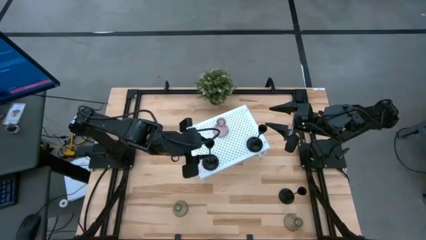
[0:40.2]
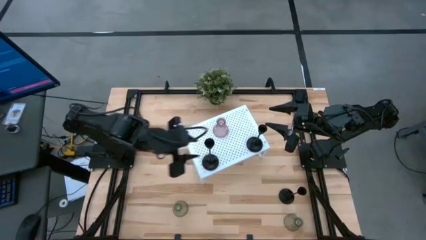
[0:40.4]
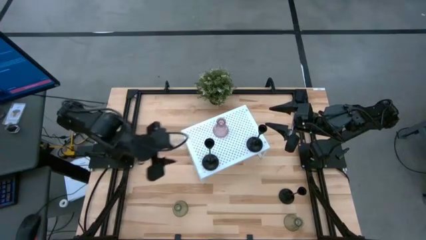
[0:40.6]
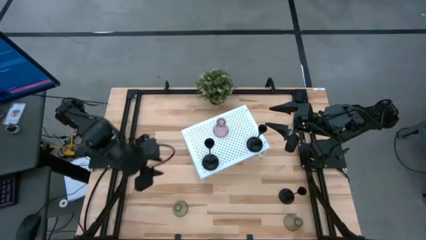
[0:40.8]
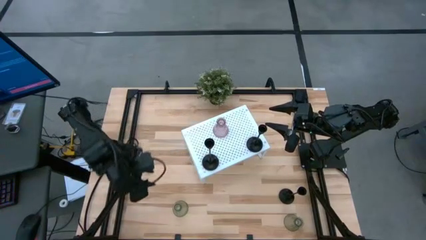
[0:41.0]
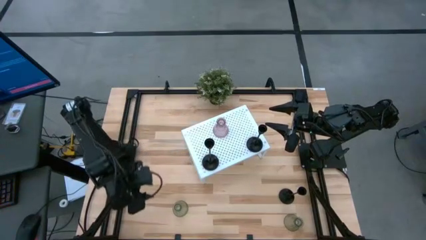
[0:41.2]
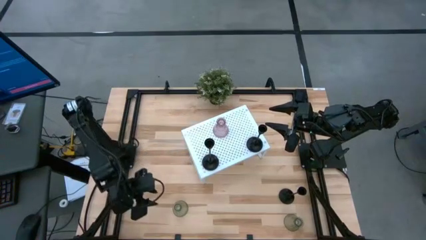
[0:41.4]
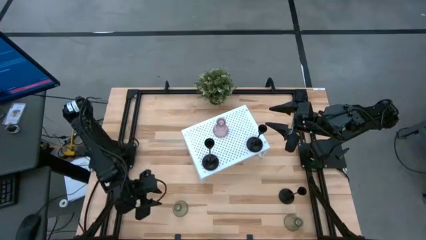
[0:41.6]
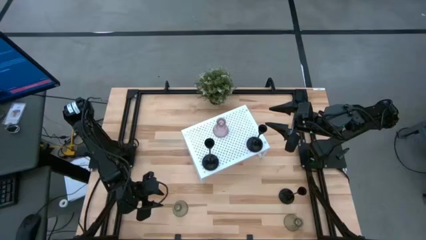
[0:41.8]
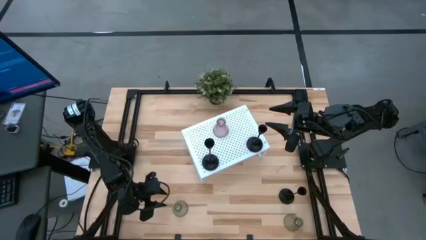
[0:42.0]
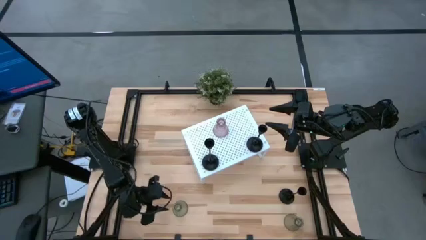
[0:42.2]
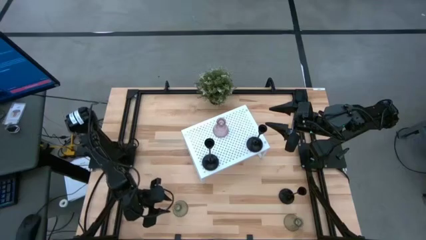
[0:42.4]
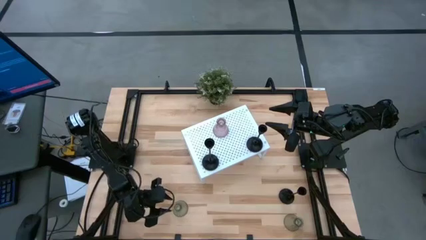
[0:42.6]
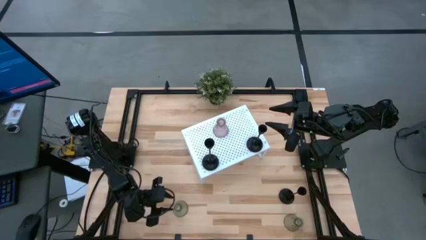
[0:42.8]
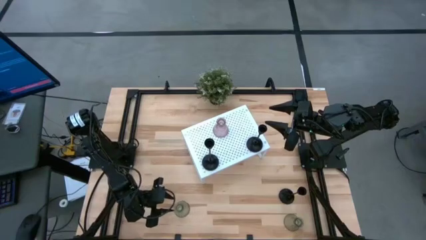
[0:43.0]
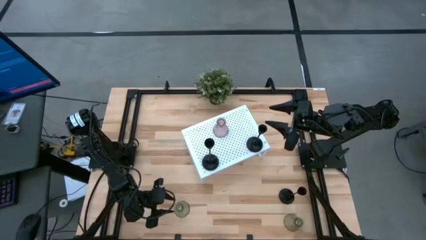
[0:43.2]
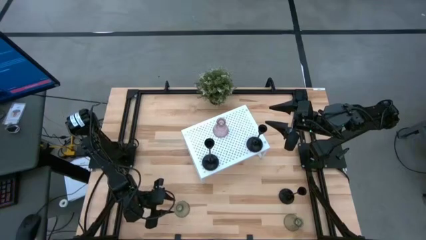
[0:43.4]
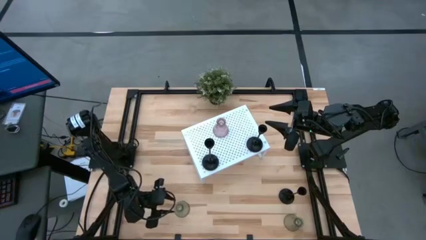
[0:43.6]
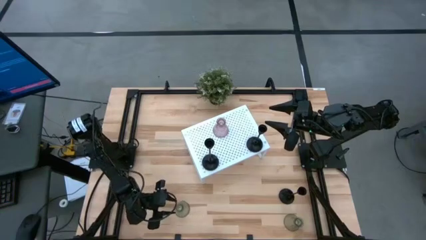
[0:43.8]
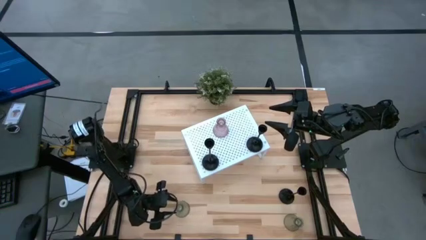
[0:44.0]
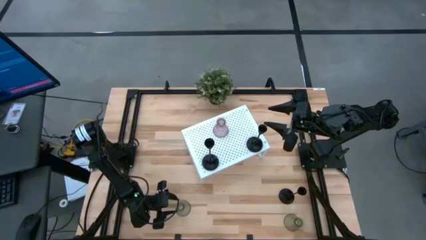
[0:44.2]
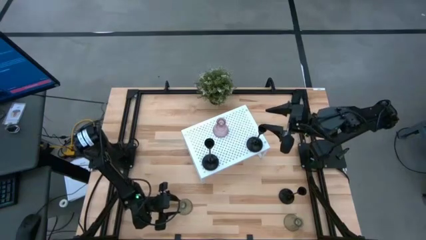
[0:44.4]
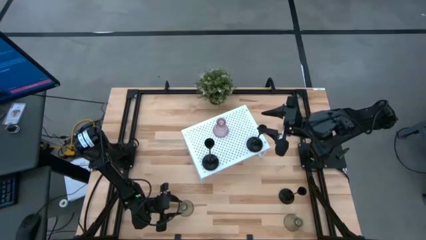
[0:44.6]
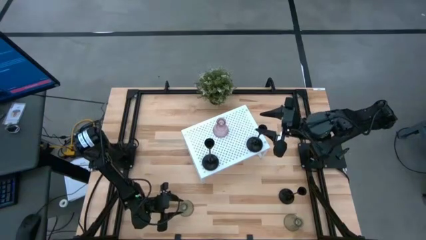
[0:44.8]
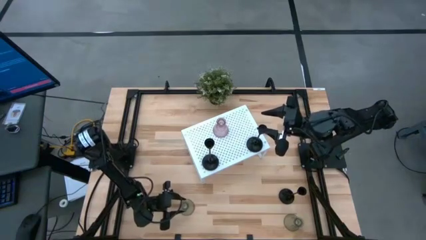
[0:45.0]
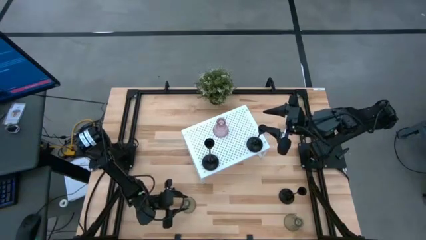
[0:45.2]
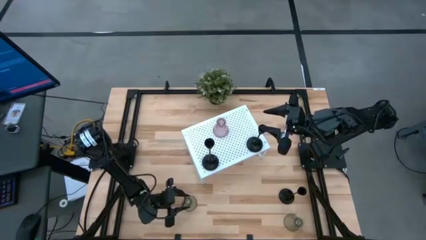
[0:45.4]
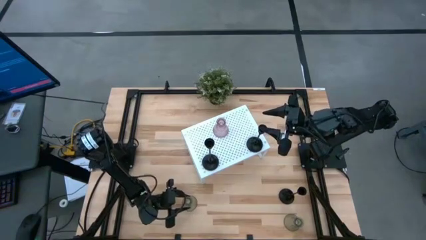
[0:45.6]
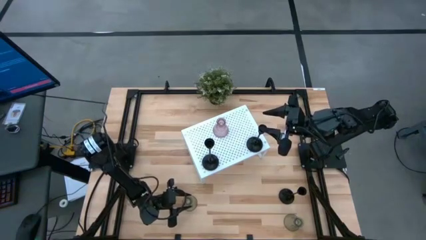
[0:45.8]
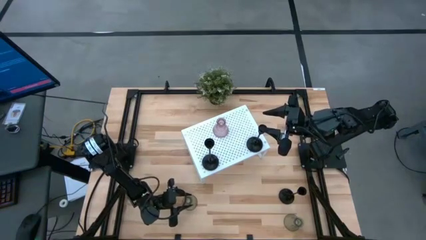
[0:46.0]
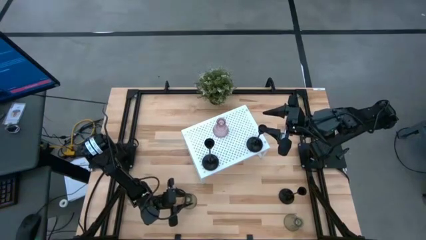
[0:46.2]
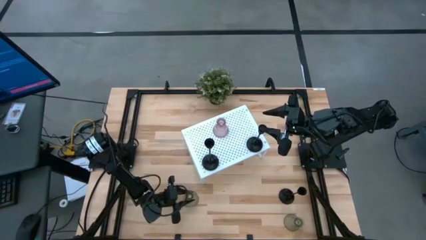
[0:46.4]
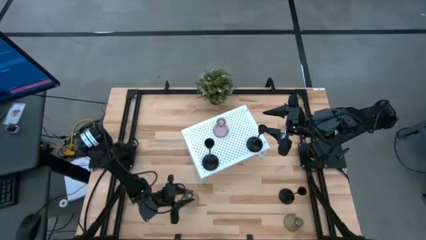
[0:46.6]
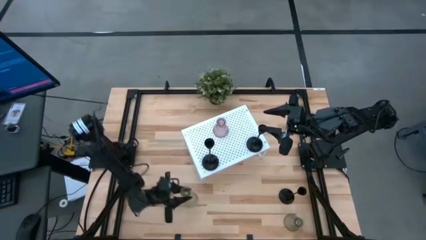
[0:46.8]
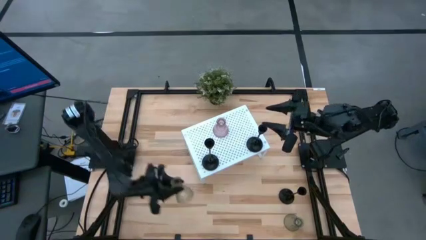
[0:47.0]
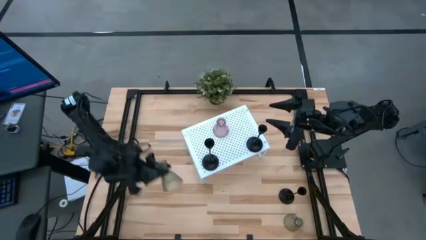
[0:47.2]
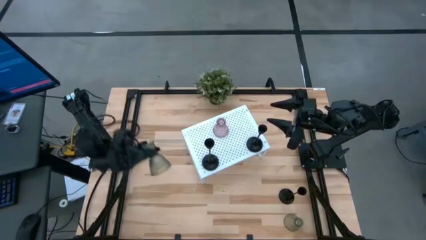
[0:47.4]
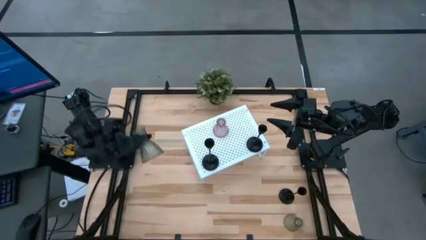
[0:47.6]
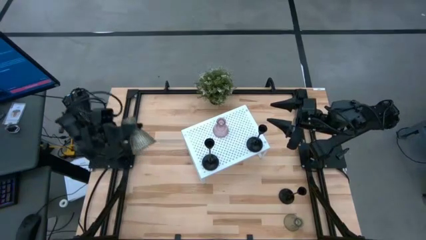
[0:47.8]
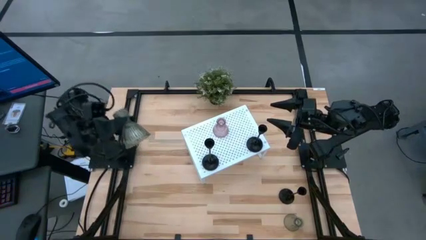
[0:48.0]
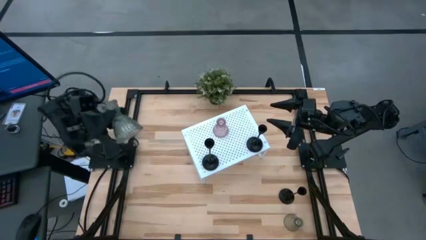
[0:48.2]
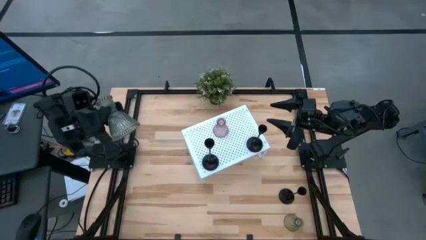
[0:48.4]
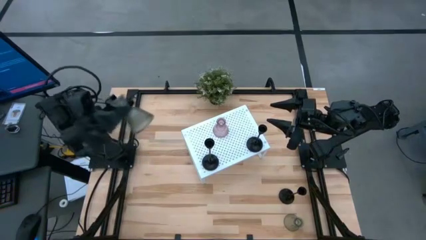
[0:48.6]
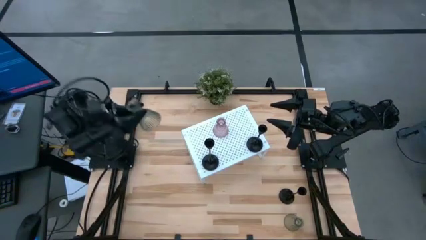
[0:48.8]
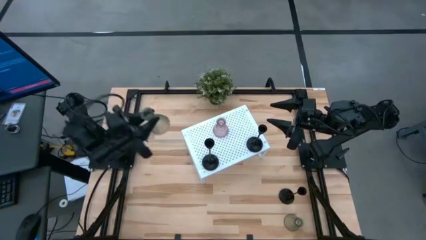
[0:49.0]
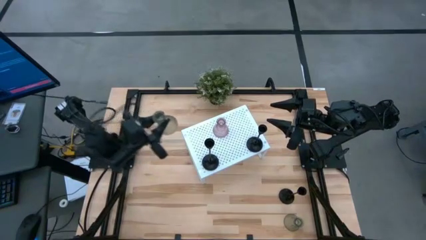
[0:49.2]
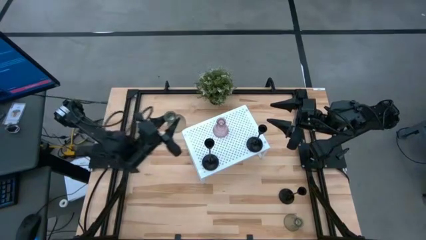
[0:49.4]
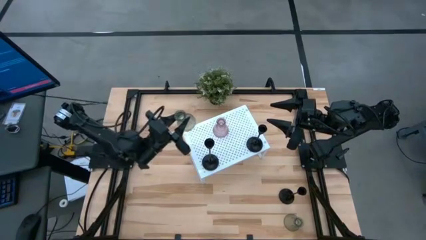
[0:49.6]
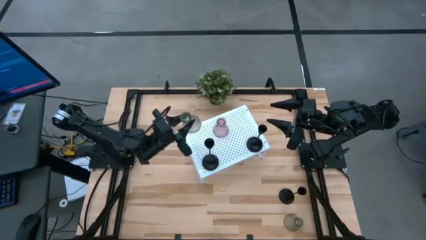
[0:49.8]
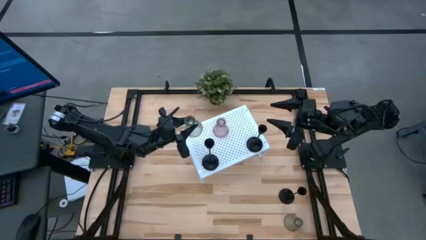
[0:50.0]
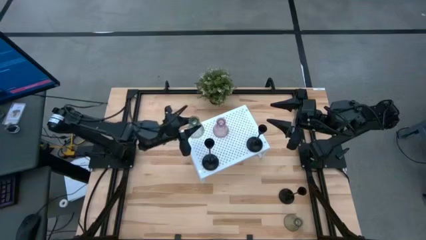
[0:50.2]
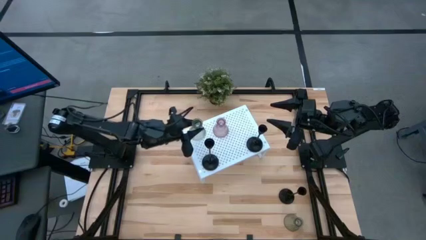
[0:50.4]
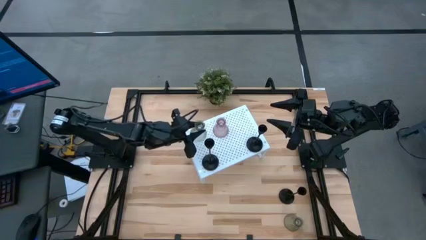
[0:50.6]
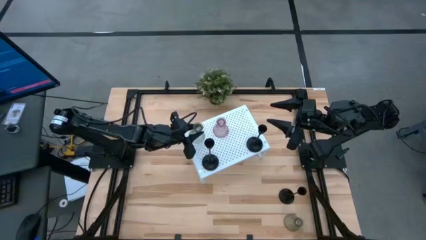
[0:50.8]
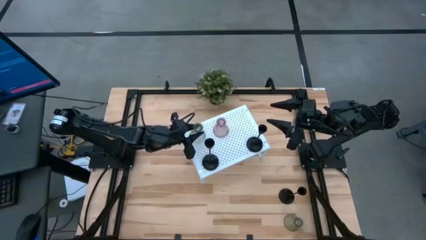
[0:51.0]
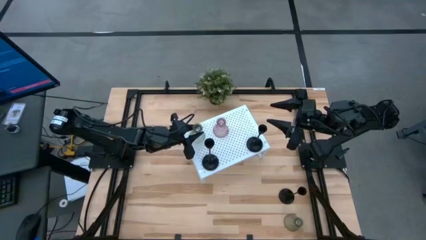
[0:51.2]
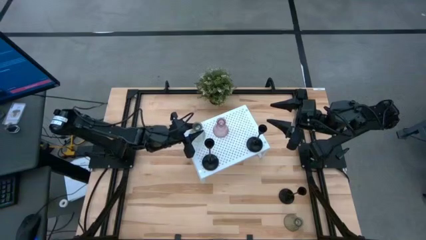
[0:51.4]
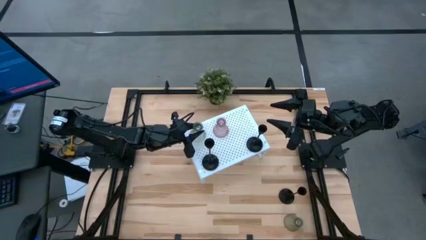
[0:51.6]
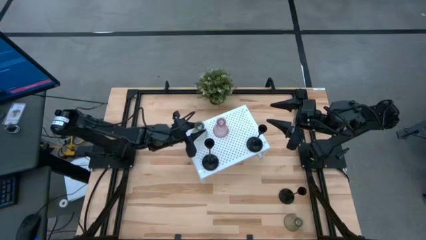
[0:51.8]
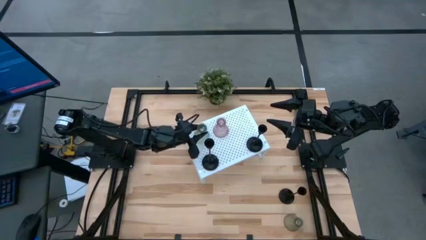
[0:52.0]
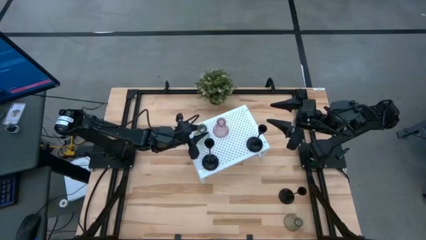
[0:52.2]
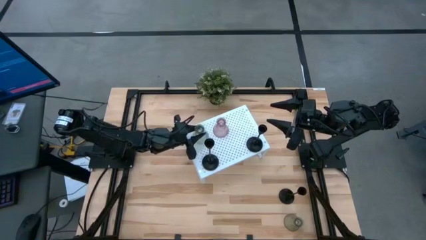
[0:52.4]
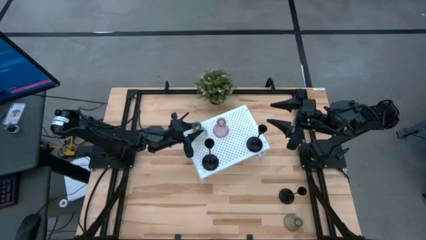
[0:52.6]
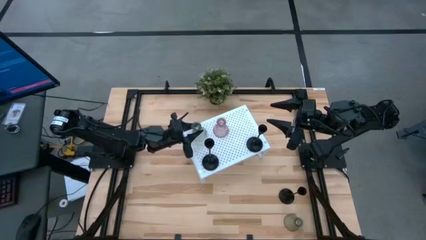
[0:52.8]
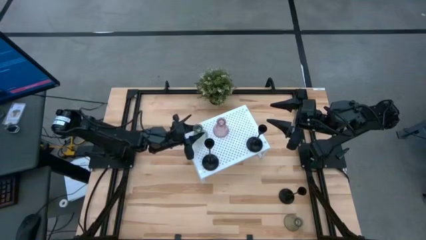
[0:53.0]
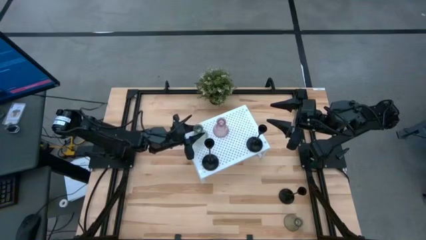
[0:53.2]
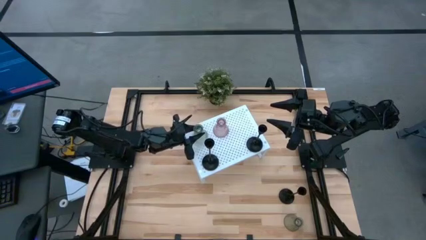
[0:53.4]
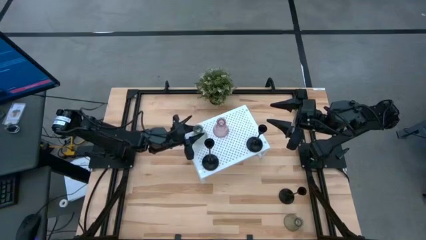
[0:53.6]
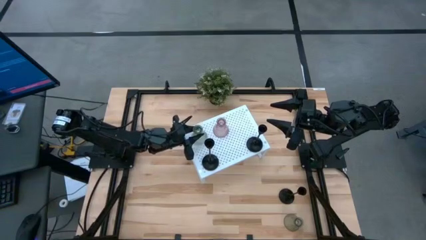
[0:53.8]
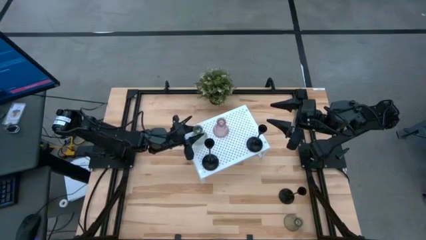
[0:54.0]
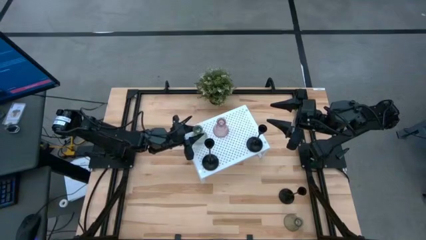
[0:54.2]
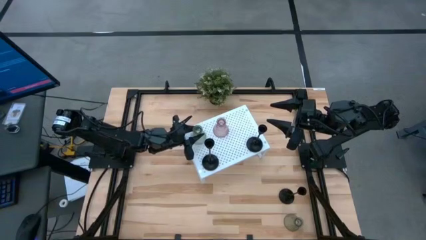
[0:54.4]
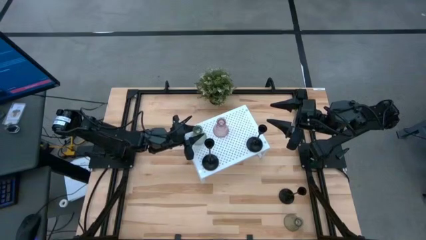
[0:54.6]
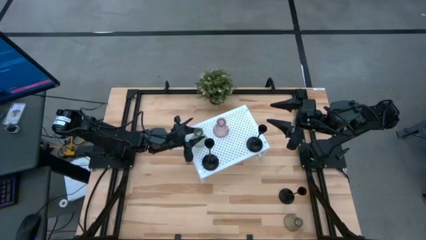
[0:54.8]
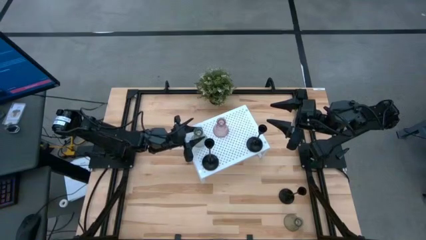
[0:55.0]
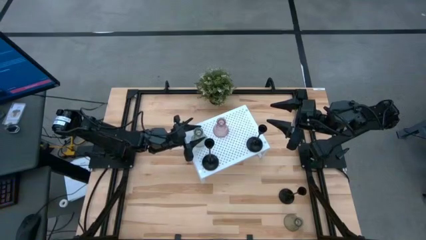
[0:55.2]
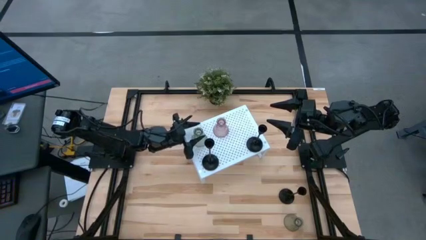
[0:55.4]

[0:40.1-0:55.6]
Task: Pick & Place candle stick holders
Put the left green transparent candle holder onto the shelf
